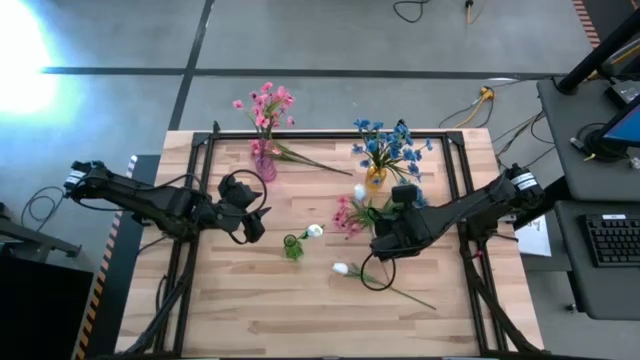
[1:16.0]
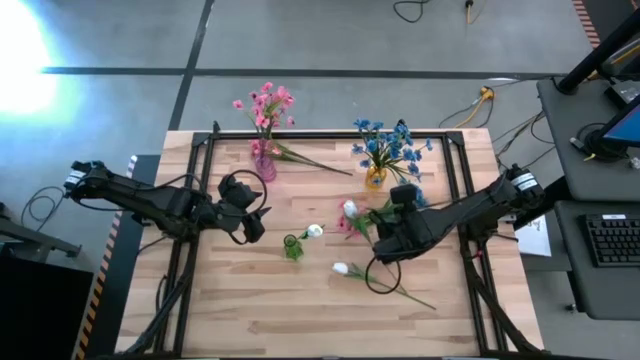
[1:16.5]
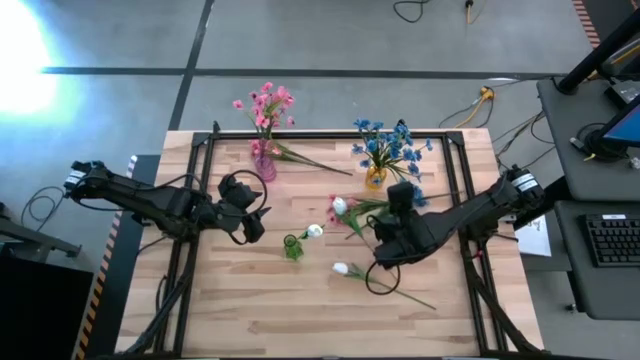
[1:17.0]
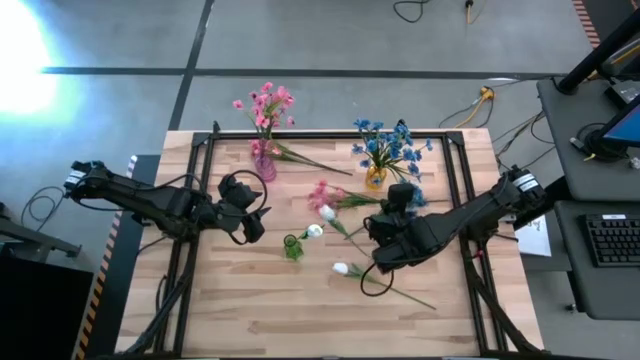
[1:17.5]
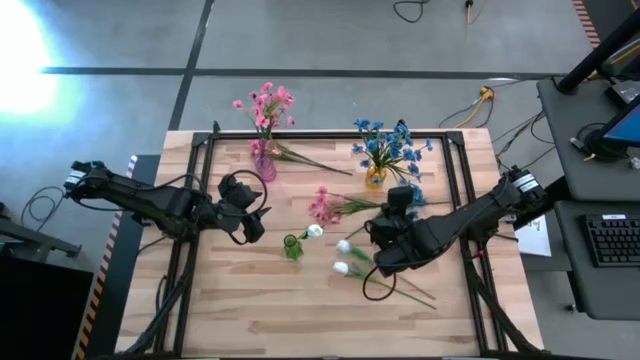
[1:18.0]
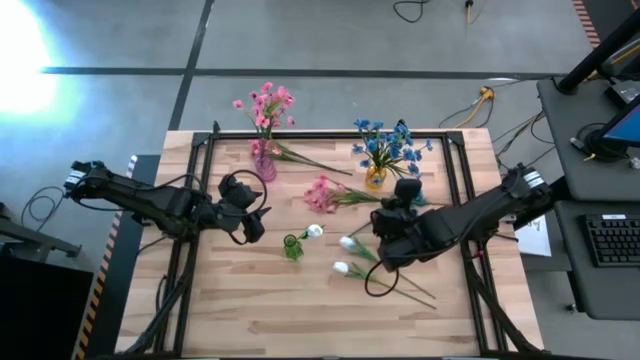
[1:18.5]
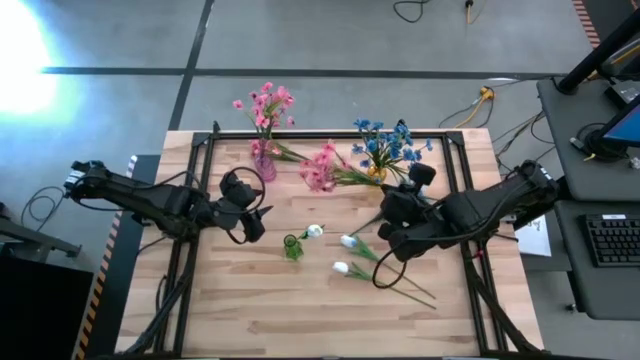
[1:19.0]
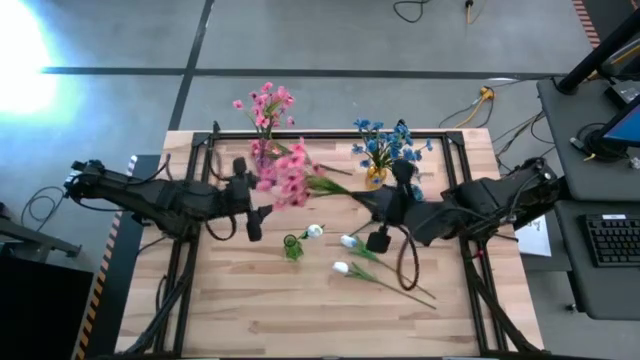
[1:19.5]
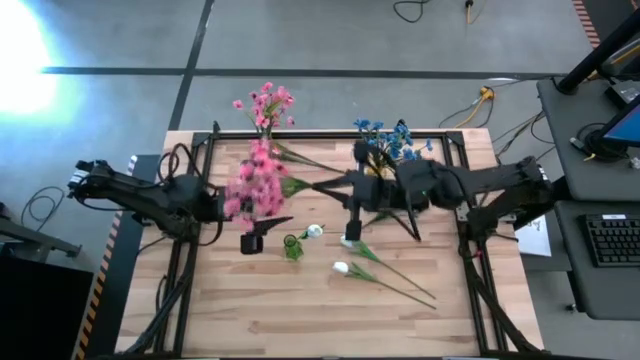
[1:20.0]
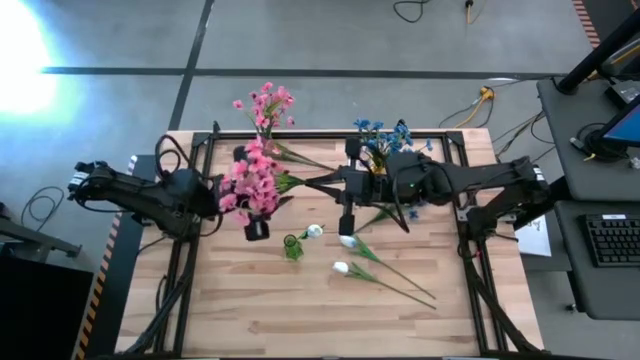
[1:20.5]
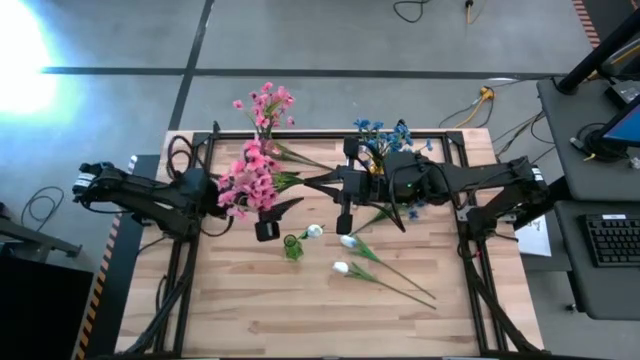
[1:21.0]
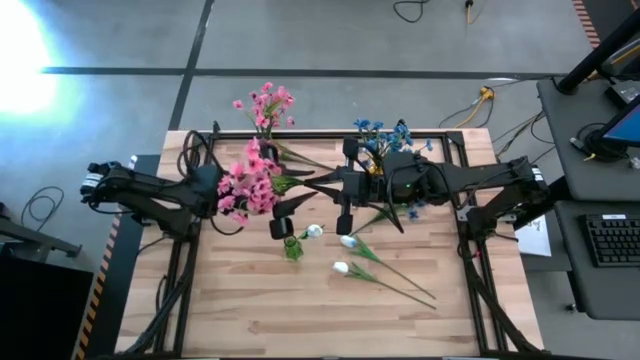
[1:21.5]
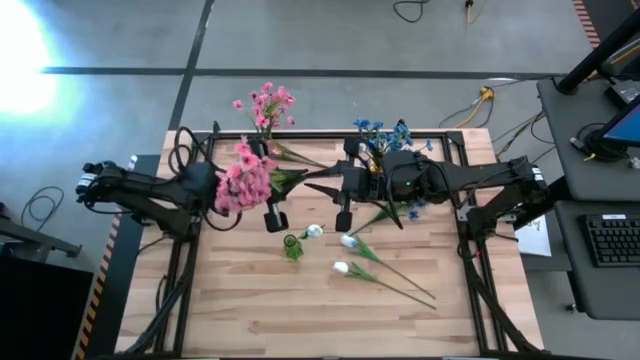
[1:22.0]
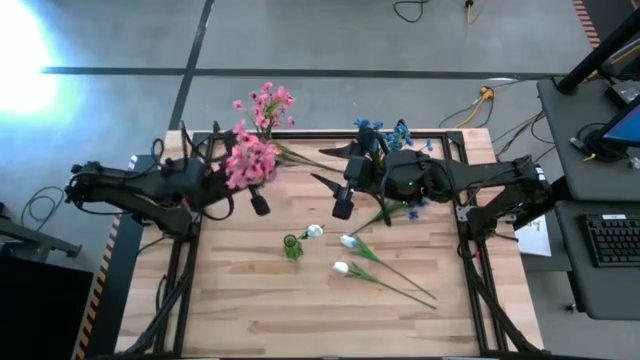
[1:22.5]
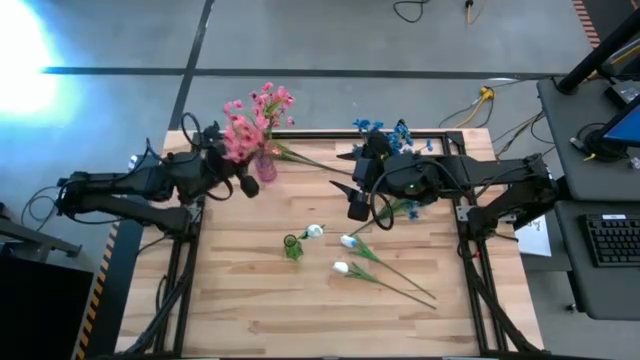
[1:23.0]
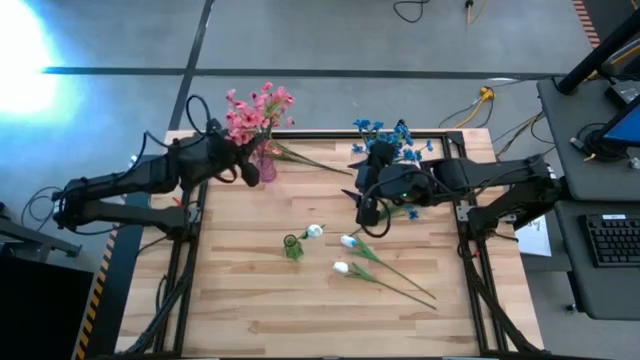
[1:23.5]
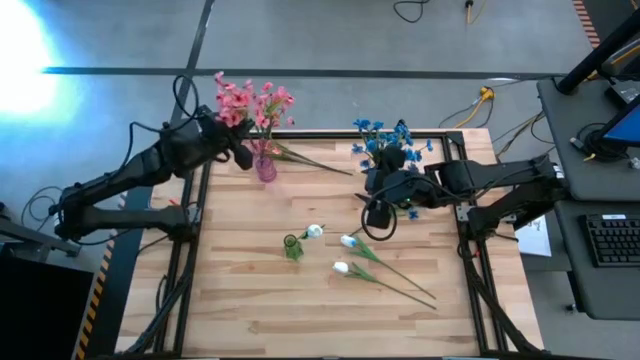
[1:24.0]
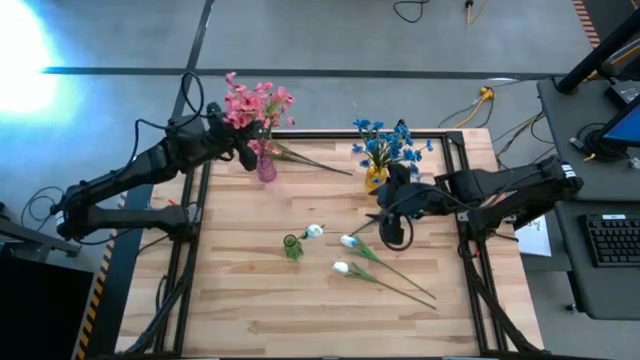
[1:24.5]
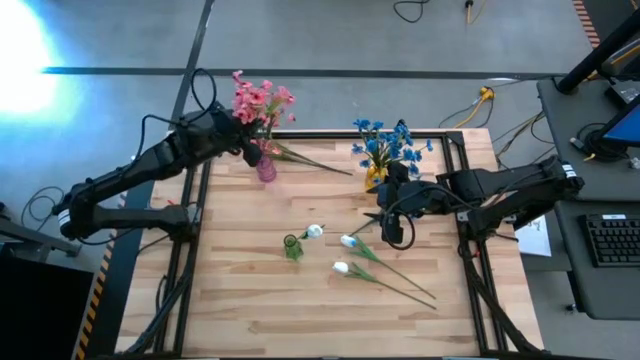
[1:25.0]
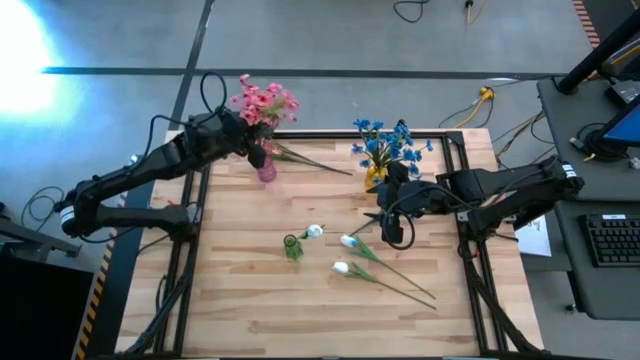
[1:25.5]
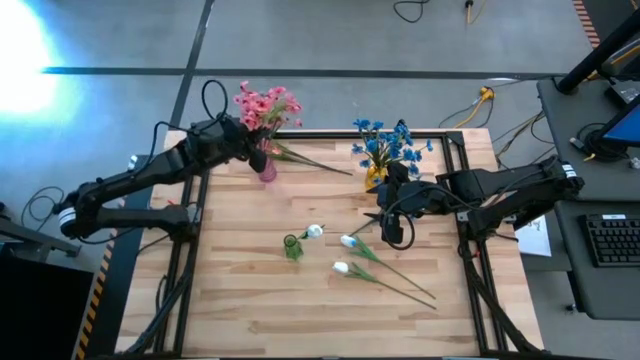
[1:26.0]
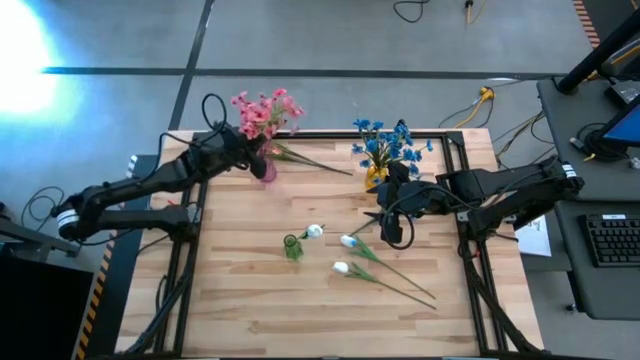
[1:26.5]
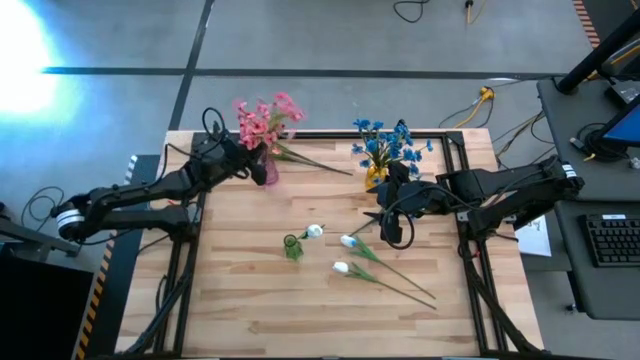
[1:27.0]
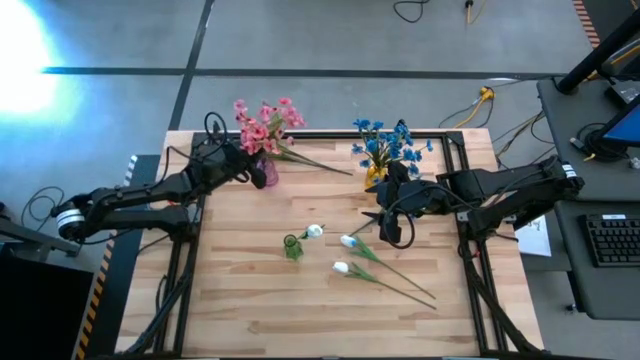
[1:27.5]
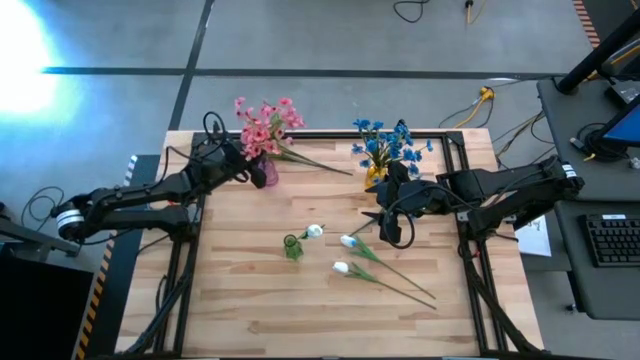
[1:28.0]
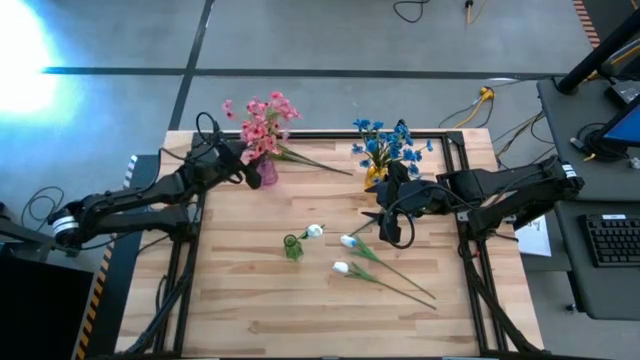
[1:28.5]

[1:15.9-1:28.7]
Task: Sort flowers into vase by color
Put the bottom pink flowers into the pink vase

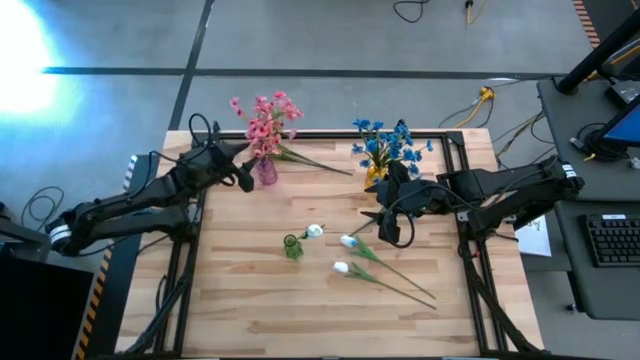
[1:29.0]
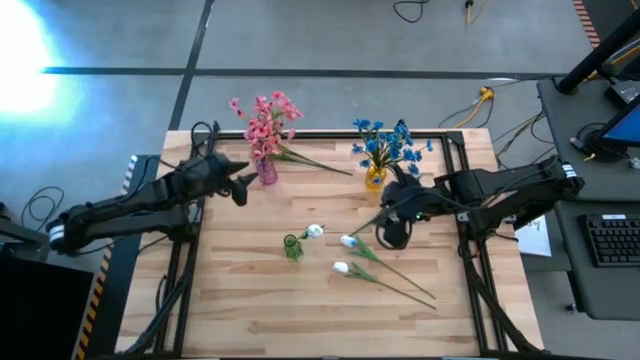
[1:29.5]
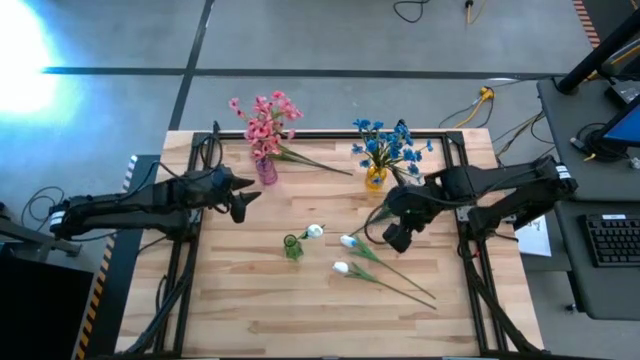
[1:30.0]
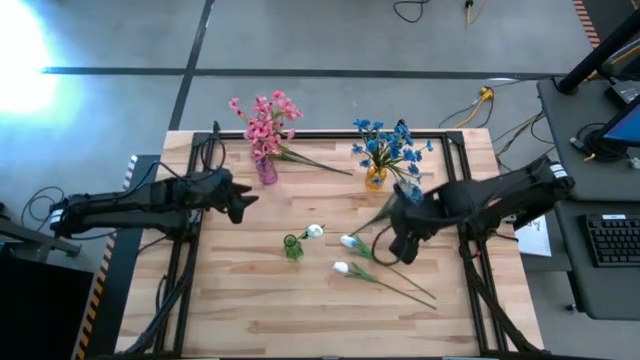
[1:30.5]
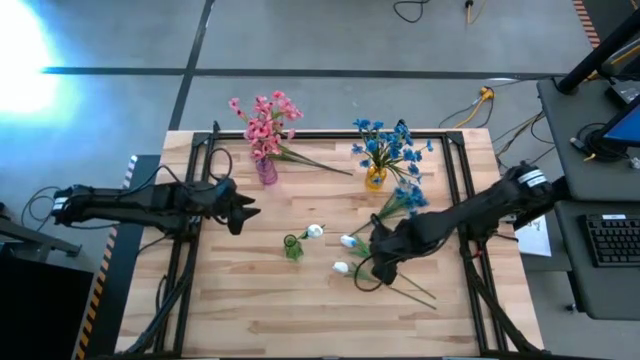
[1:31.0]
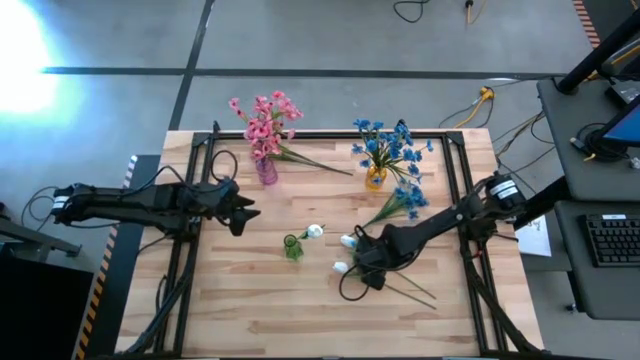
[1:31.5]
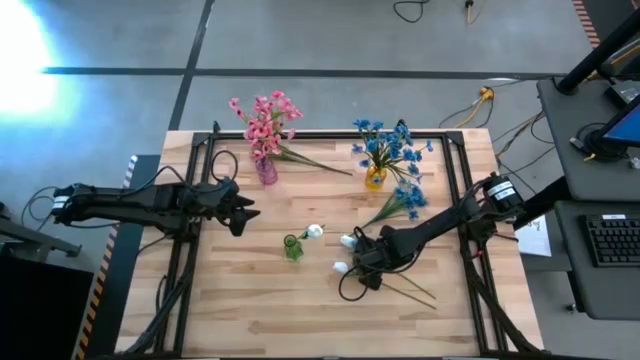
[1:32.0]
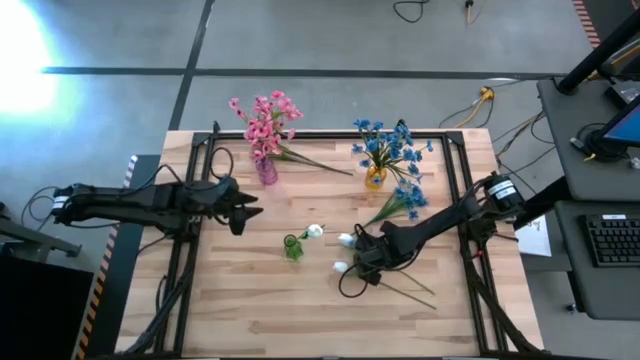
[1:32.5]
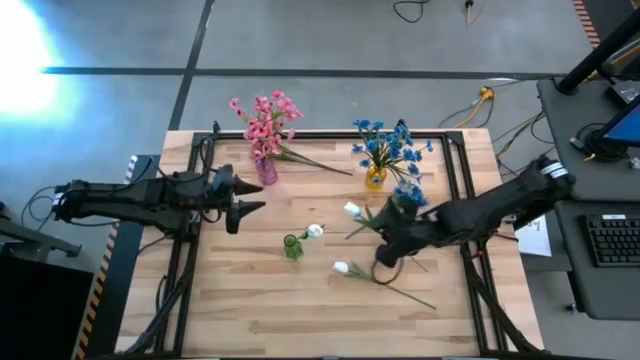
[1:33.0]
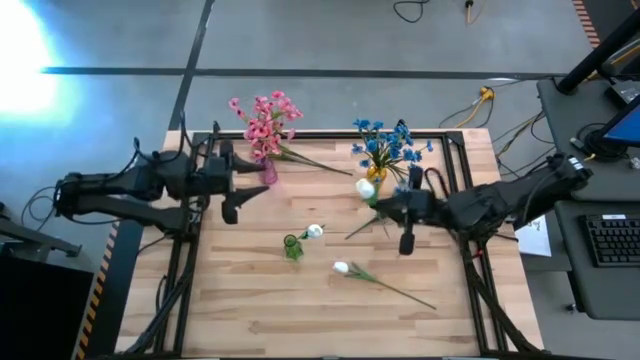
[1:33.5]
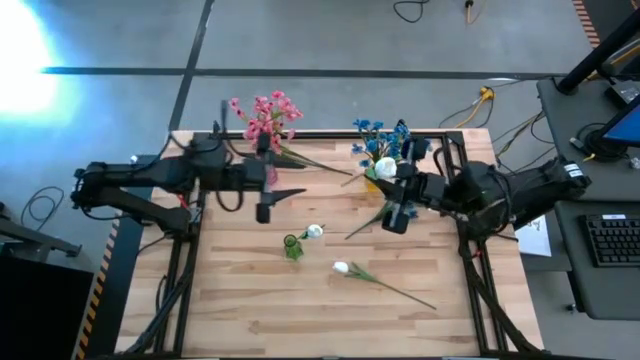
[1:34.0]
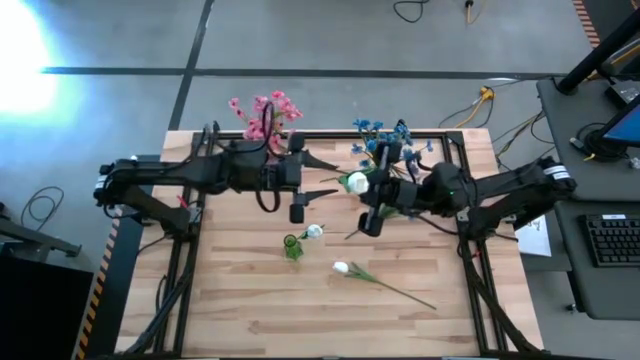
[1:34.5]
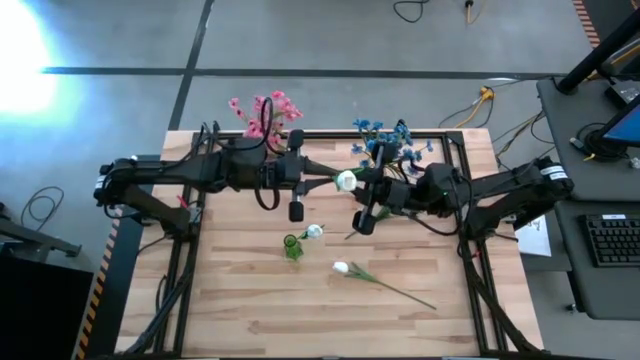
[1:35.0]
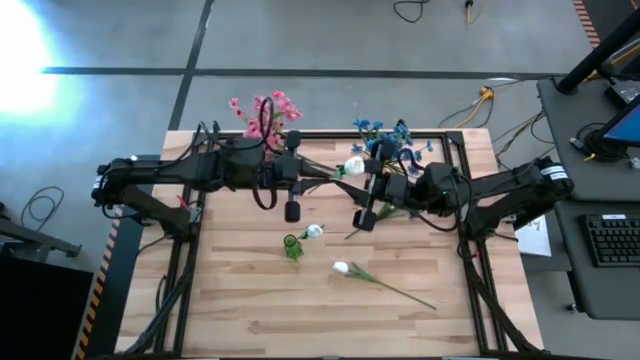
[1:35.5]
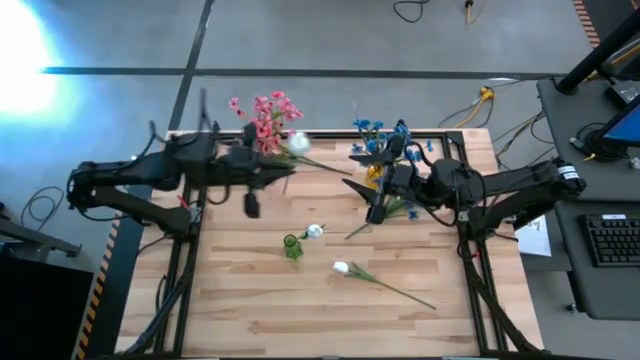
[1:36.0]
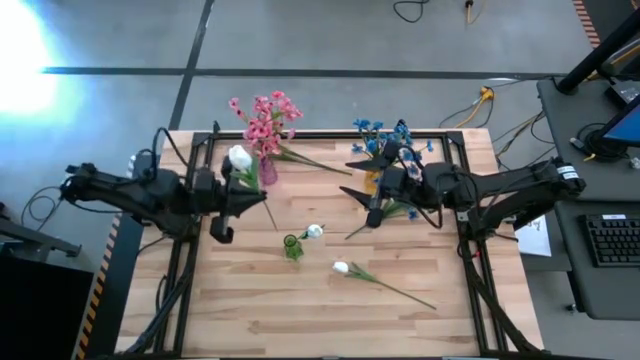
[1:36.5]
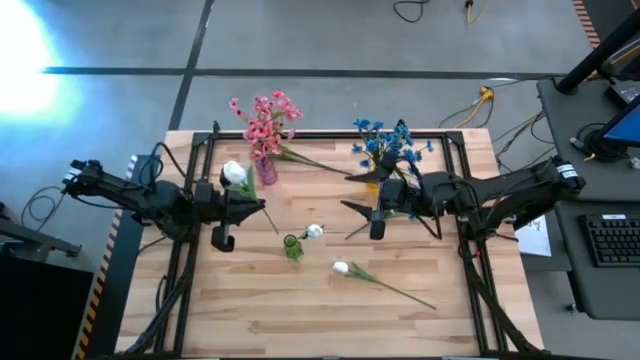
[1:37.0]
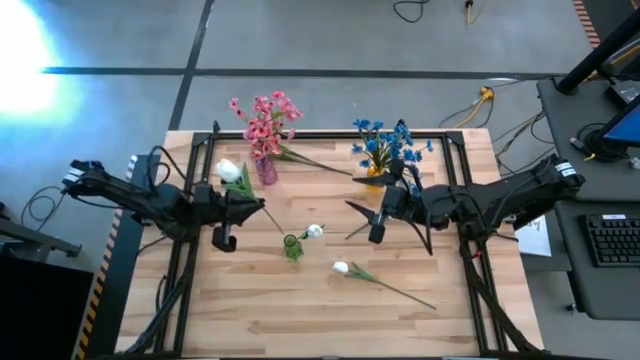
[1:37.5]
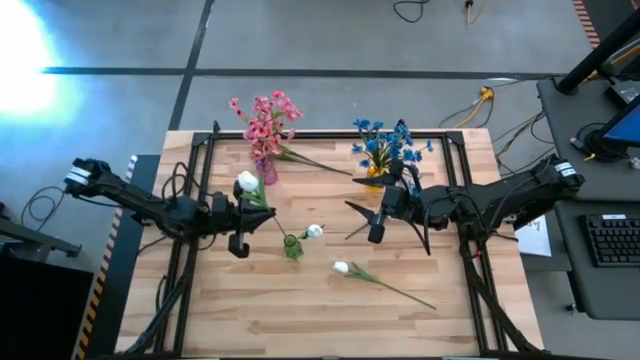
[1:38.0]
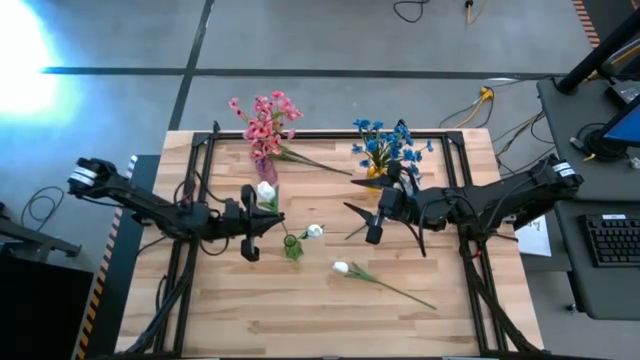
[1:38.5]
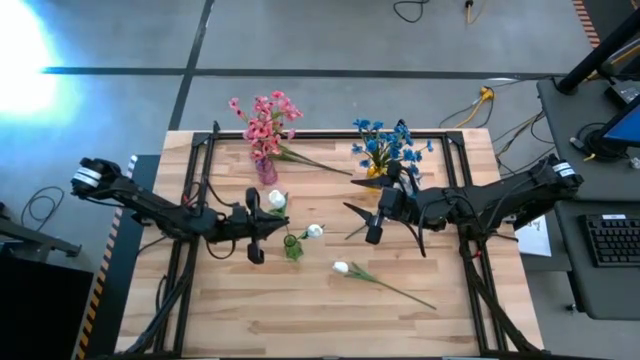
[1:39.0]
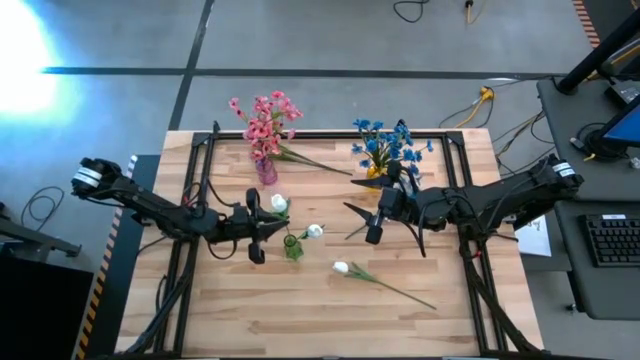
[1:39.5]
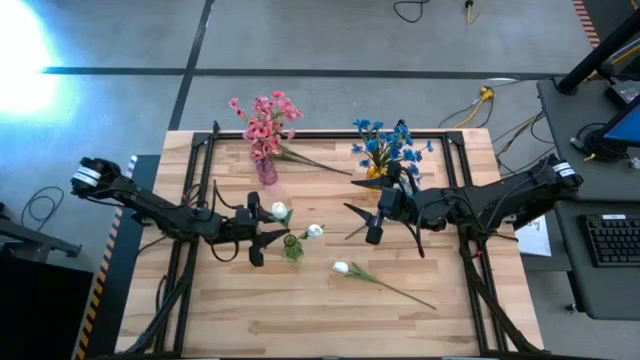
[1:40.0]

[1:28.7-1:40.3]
Put the top white flower into the green vase
